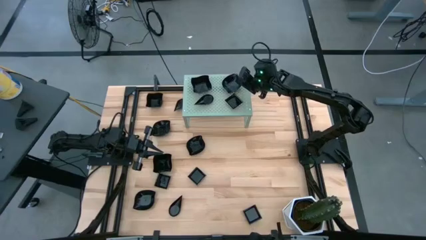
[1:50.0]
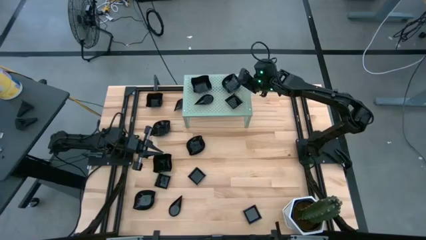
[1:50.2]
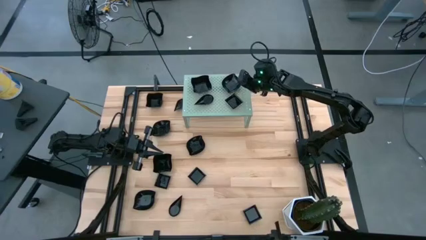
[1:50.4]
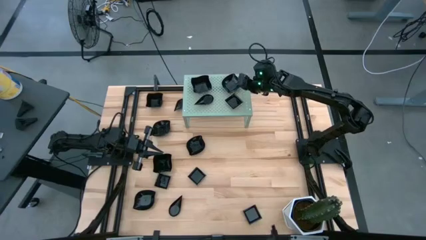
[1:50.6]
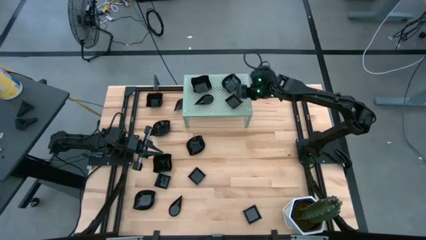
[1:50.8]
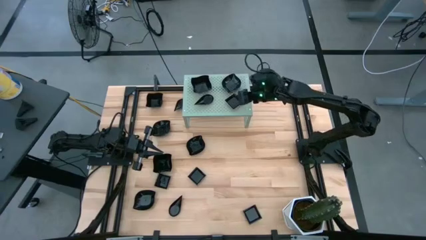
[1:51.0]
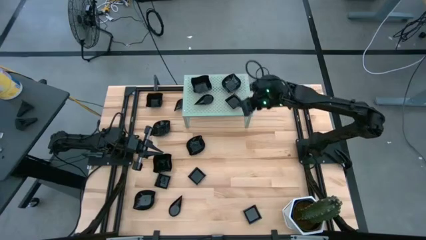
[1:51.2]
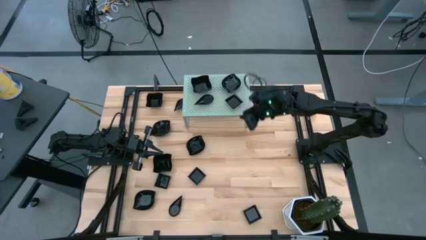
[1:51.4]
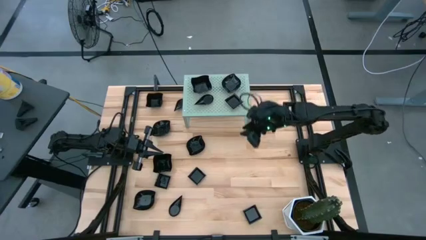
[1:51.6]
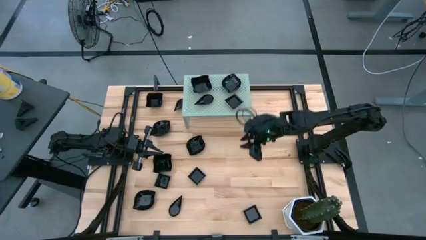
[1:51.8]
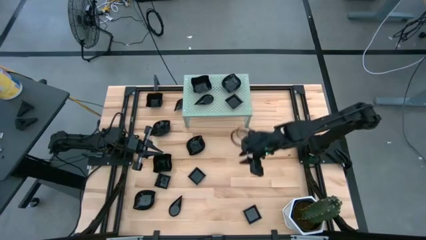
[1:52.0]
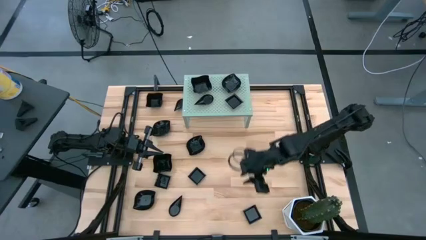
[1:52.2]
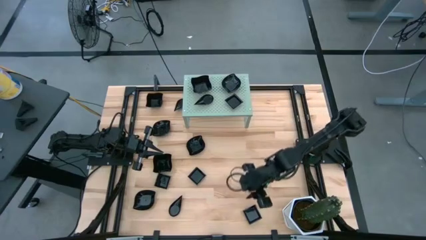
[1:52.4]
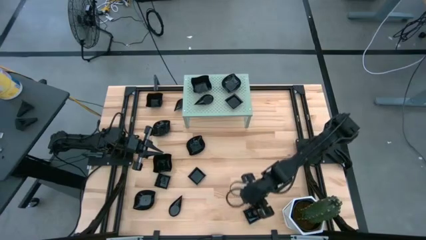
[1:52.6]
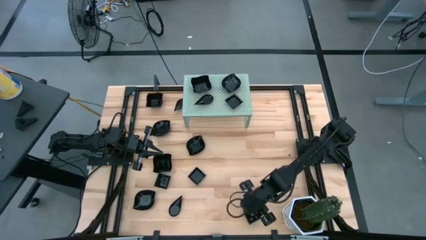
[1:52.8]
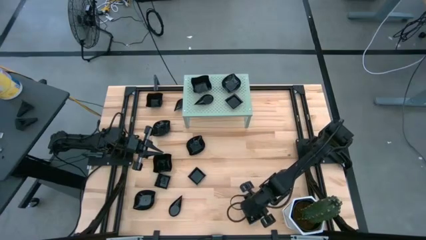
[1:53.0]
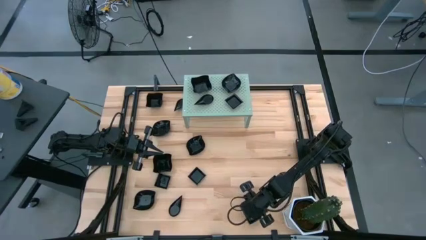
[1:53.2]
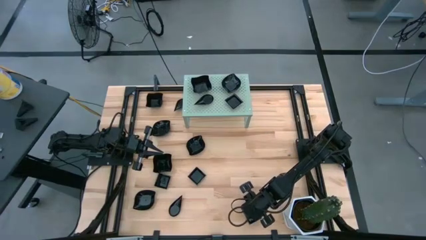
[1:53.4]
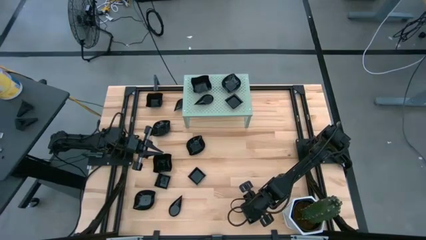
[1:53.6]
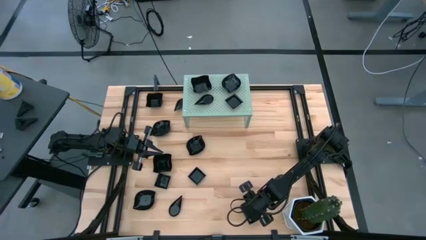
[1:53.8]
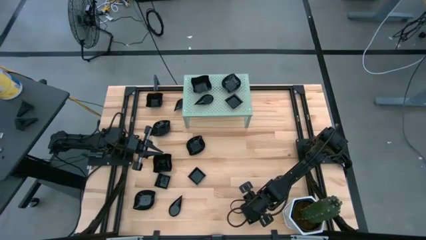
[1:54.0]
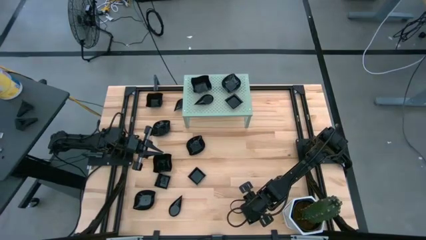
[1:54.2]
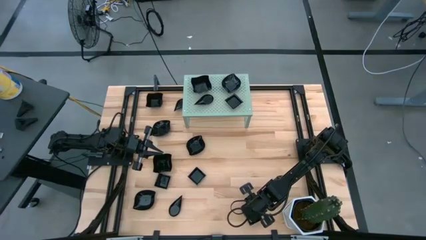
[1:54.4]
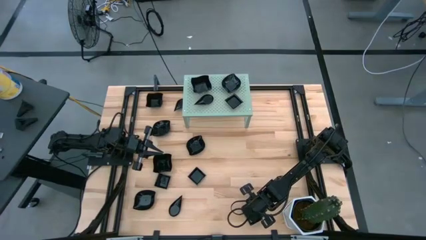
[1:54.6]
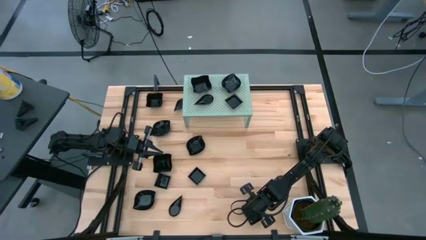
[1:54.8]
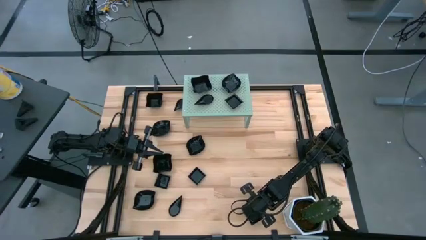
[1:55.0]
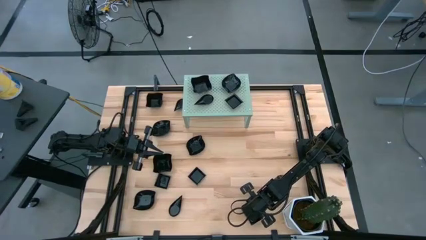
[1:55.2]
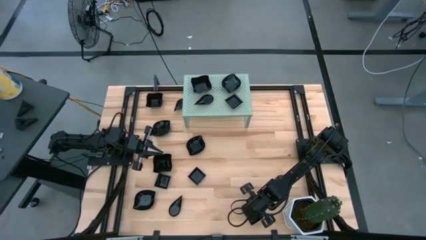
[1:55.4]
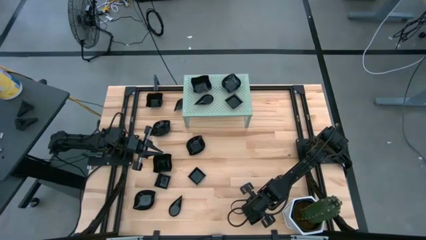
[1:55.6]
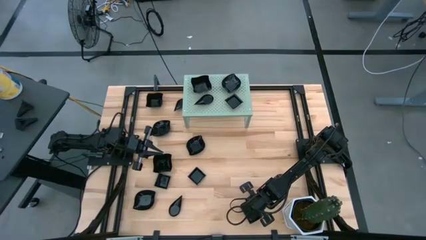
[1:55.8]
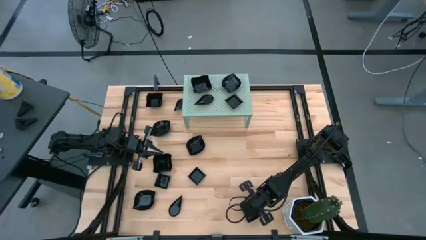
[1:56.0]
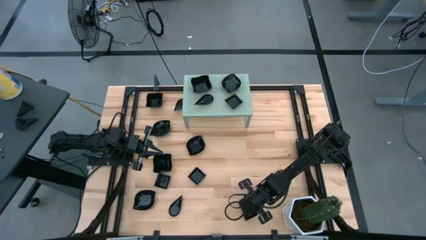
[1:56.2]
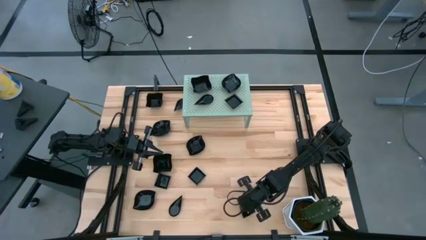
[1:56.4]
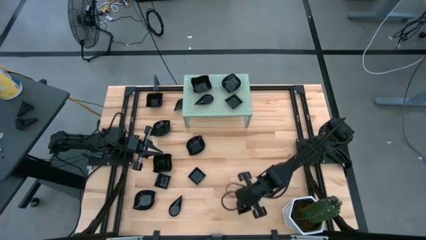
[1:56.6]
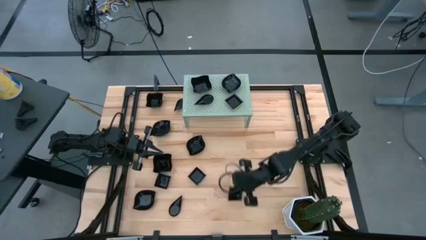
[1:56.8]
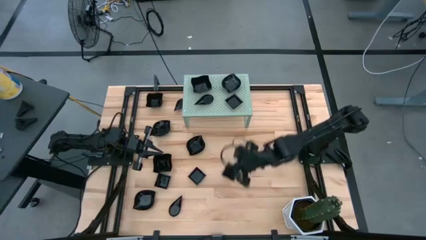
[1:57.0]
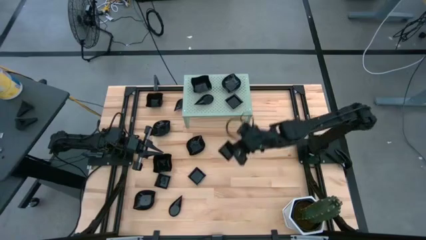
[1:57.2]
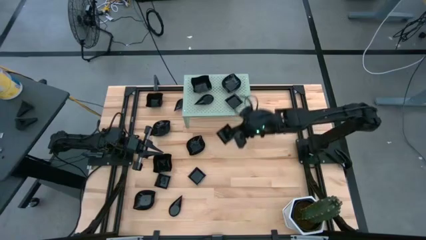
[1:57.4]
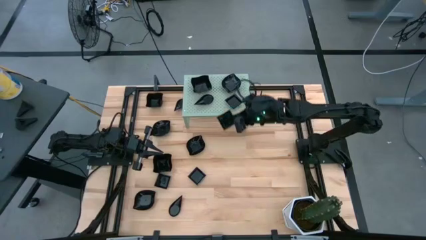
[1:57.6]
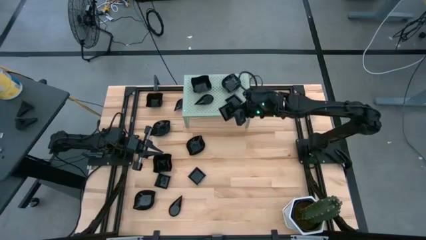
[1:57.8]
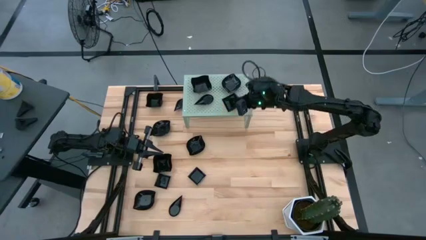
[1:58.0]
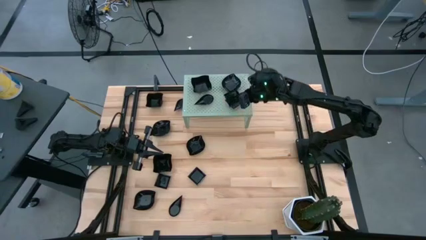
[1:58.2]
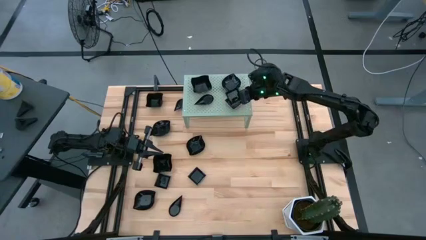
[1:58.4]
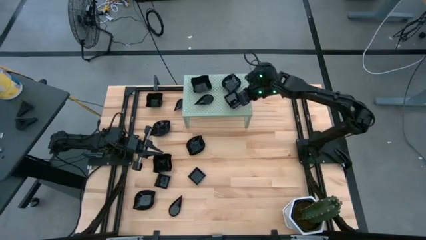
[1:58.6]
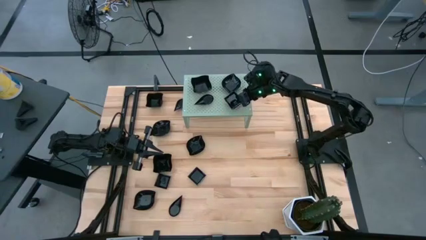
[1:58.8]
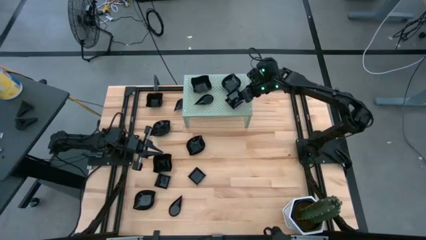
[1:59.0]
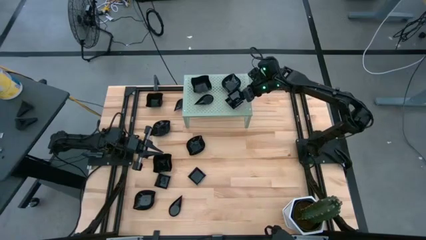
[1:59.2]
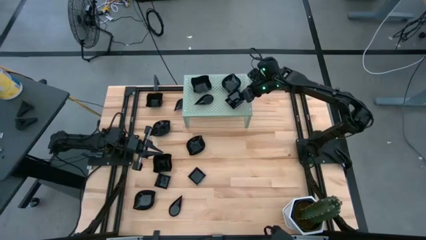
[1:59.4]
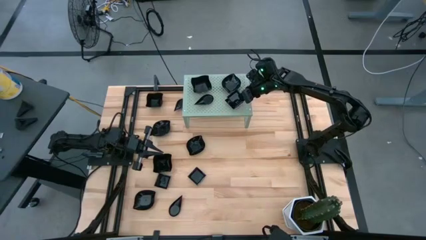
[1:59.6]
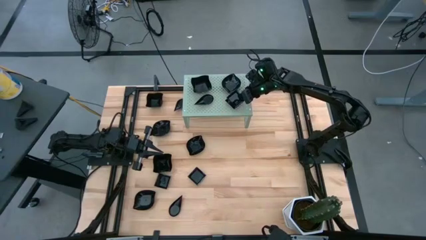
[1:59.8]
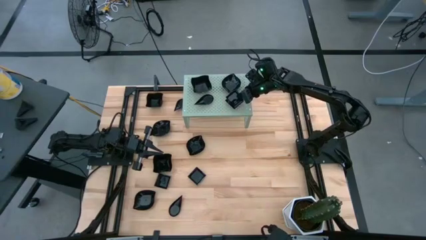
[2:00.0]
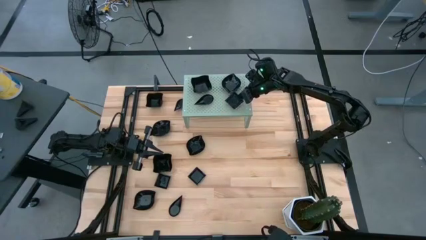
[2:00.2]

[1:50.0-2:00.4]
Task: Pick & Place Mini shaped plates
Stack the square plate on top of the square plate on the shelf

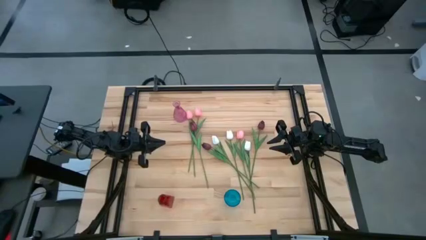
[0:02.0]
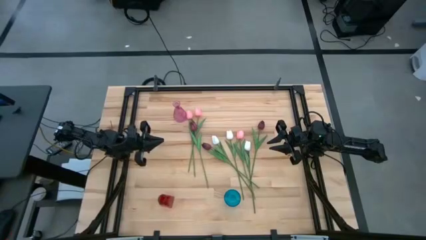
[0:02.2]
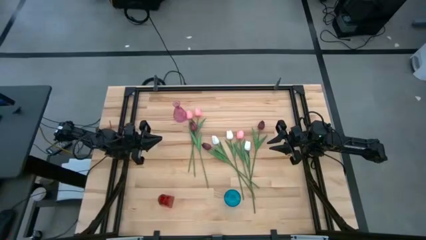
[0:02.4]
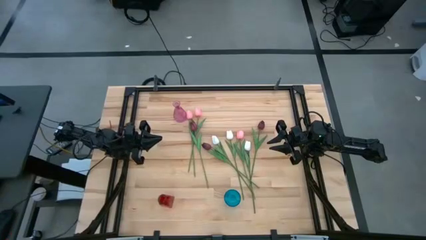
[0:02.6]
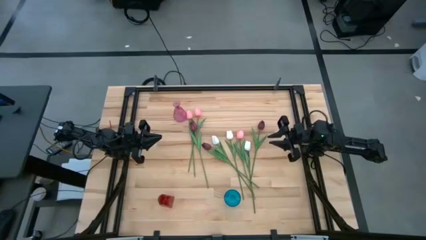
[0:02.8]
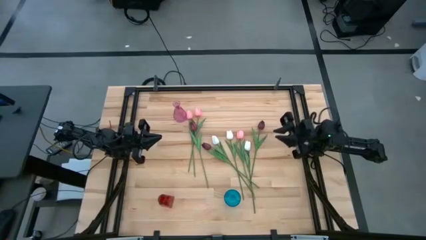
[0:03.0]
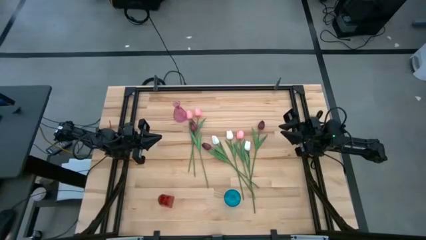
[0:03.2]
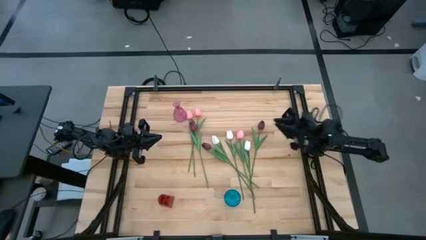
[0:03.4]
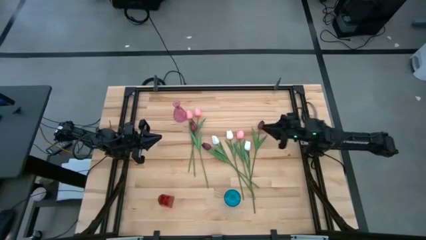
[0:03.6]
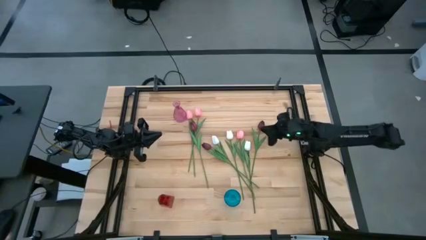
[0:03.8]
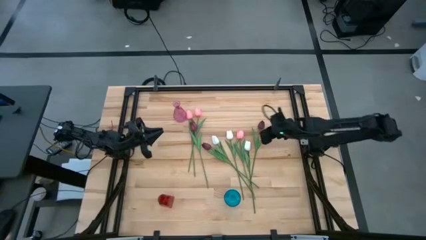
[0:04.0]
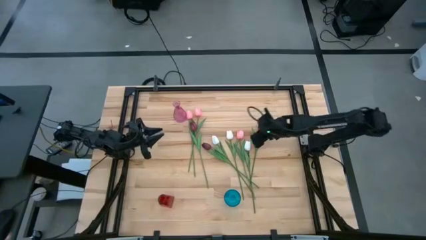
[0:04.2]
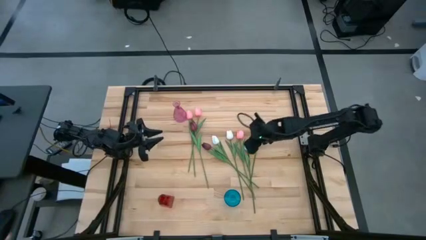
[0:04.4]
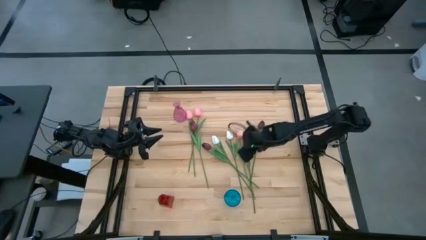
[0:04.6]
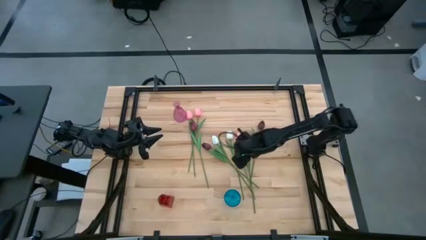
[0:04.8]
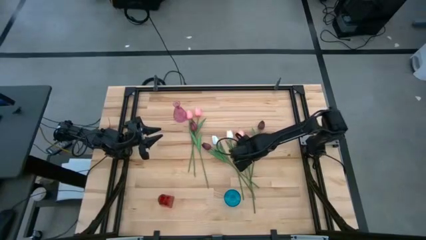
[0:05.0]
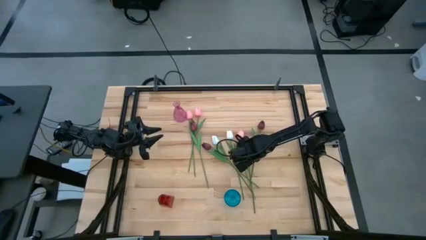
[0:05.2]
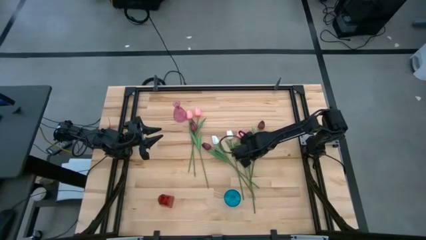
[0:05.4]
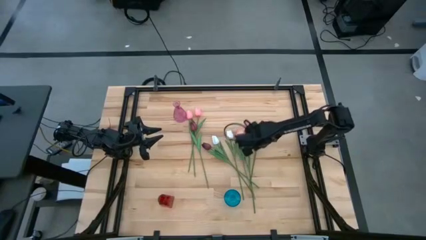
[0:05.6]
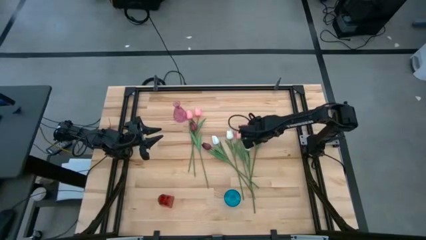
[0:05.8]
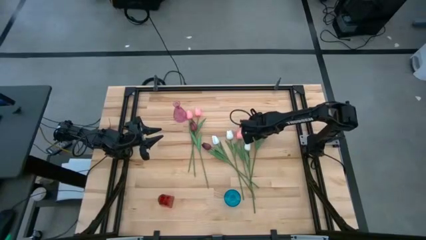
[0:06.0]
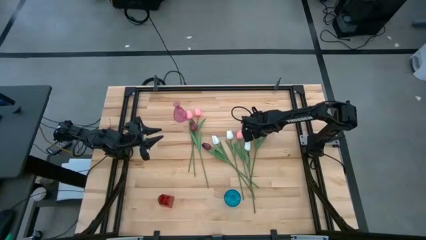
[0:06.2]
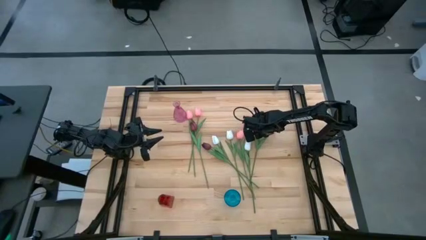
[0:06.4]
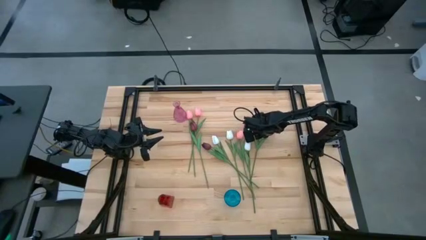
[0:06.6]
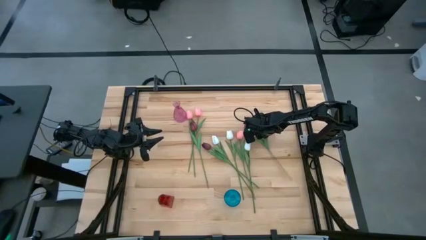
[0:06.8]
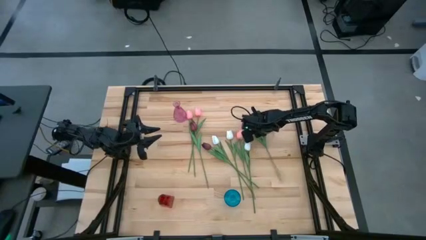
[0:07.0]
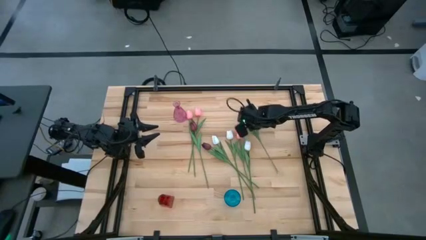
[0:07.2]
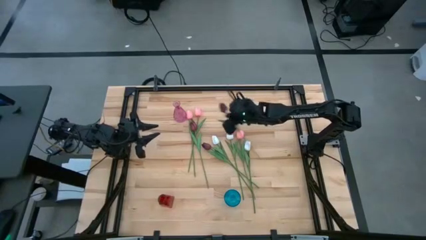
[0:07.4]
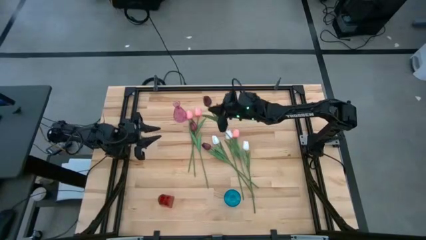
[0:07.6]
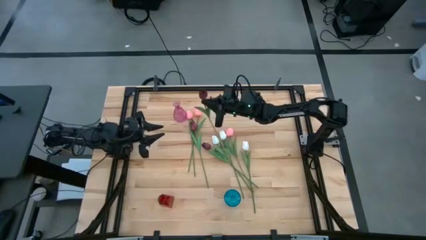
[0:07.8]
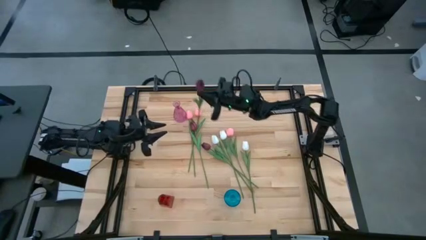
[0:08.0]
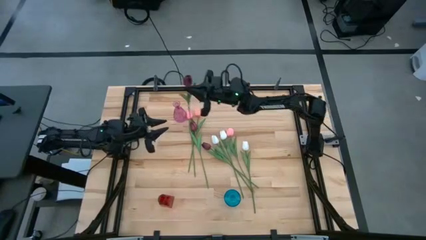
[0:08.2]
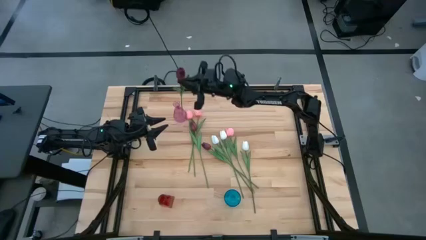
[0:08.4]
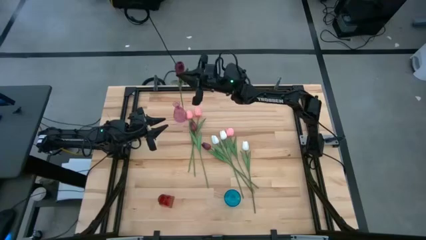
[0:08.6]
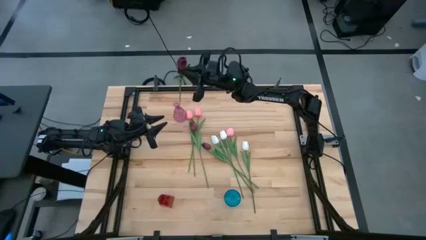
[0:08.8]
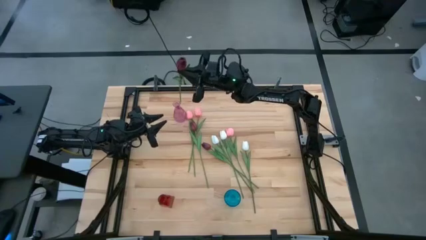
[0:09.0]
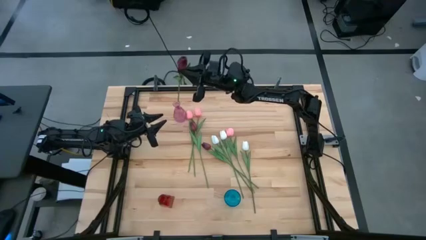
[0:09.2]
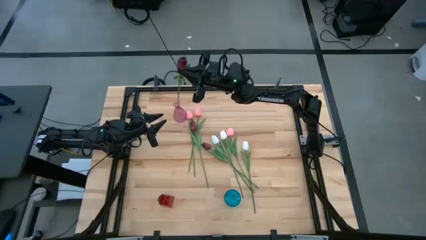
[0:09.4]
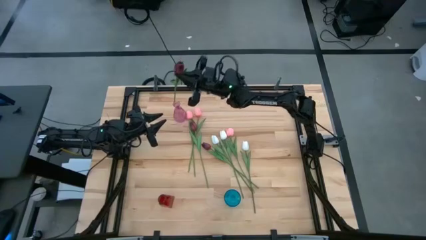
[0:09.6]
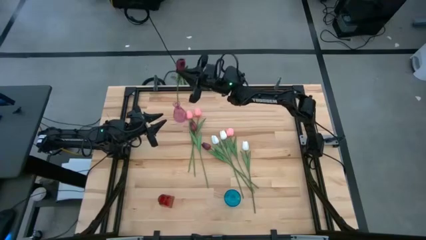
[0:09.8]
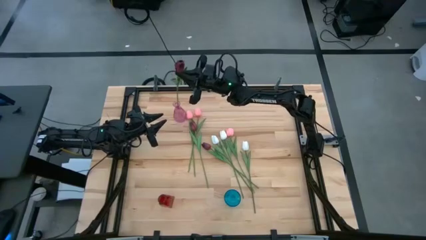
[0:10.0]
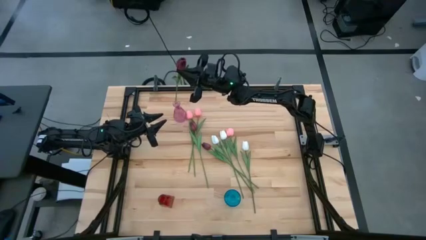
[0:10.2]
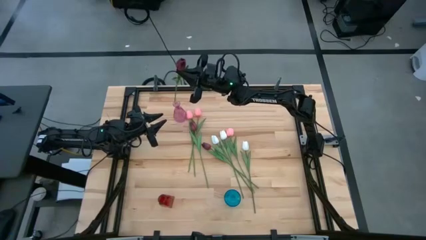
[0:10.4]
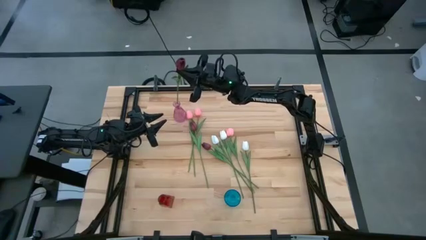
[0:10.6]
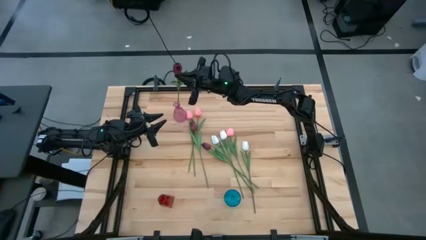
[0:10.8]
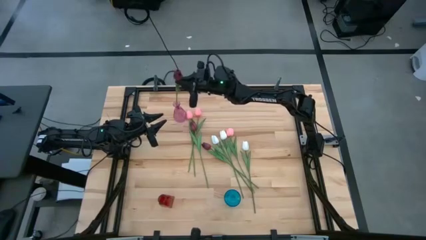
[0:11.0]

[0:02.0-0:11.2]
Task: Sort flowers into vase by color
Put the top right red flower into the purple vase
